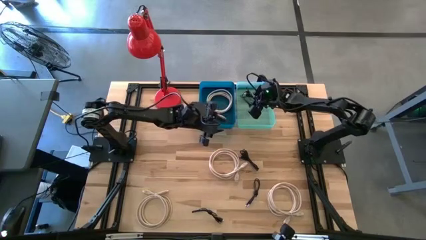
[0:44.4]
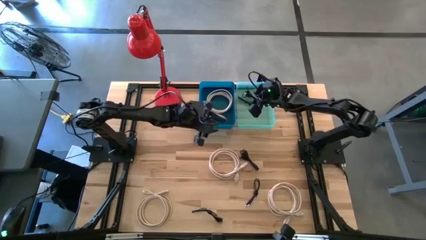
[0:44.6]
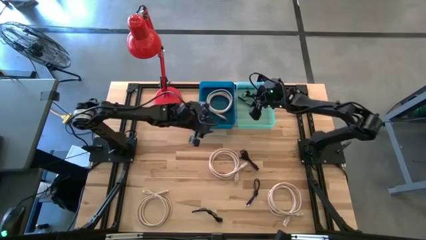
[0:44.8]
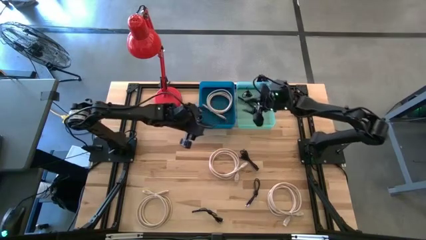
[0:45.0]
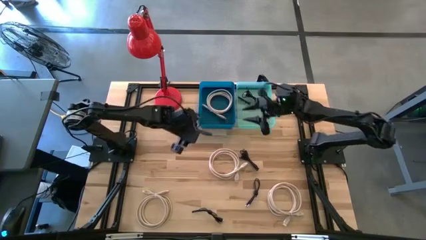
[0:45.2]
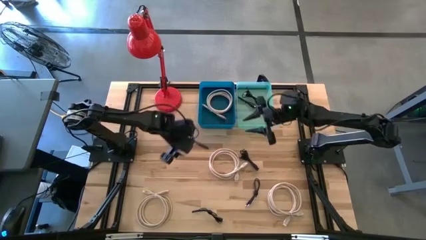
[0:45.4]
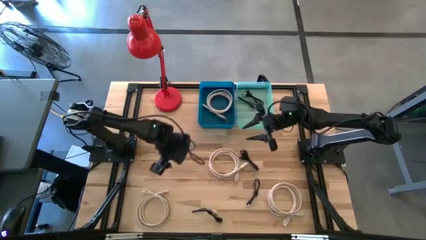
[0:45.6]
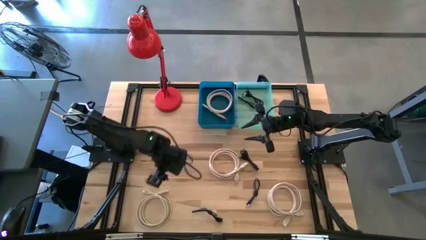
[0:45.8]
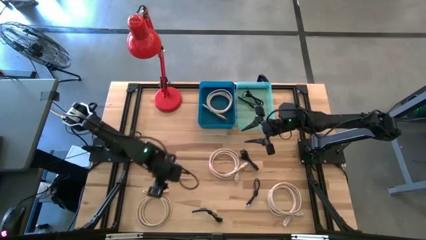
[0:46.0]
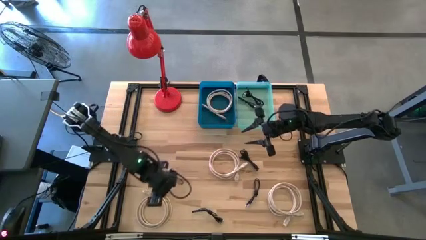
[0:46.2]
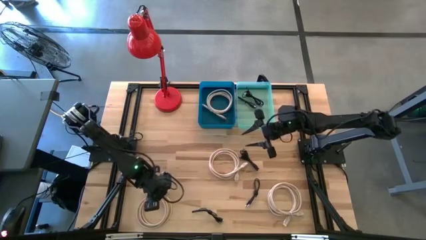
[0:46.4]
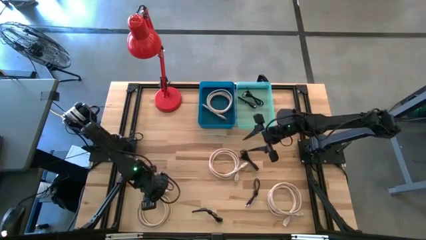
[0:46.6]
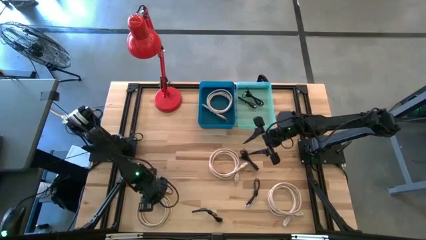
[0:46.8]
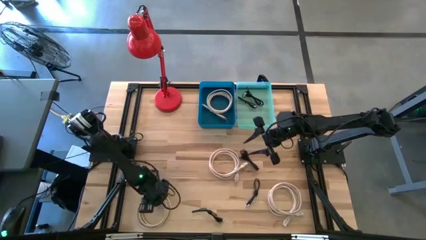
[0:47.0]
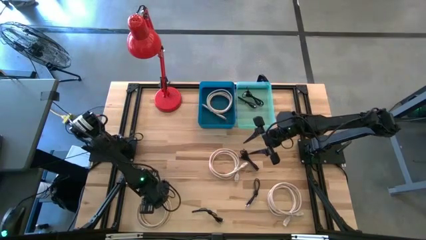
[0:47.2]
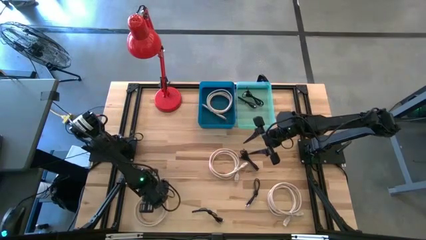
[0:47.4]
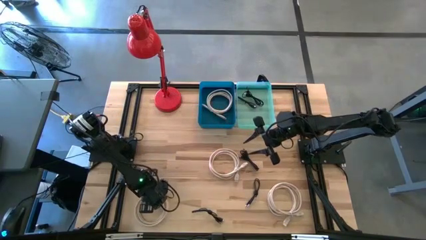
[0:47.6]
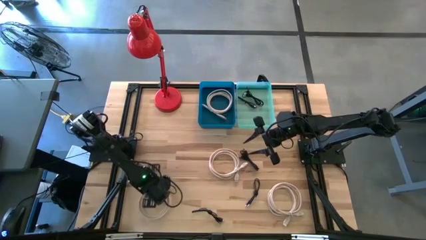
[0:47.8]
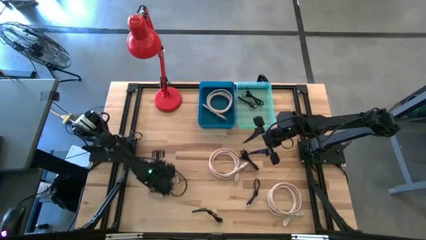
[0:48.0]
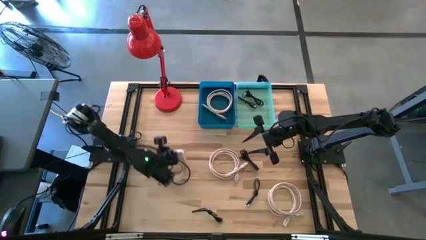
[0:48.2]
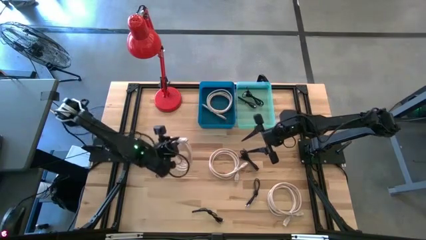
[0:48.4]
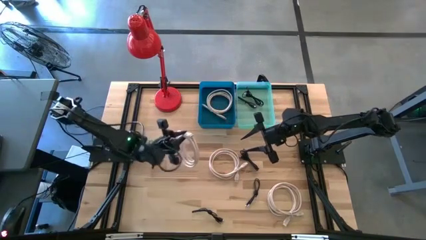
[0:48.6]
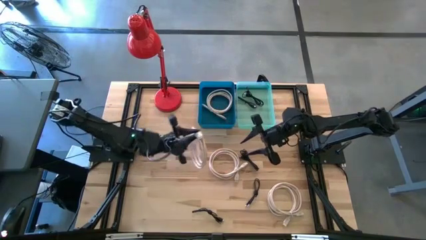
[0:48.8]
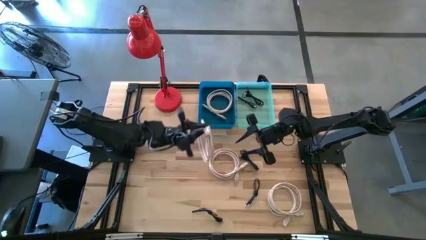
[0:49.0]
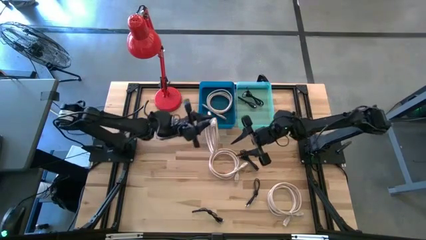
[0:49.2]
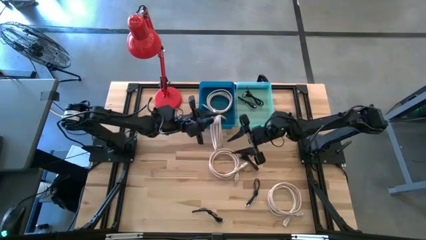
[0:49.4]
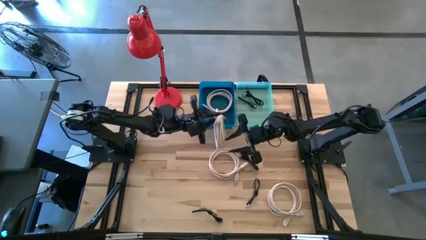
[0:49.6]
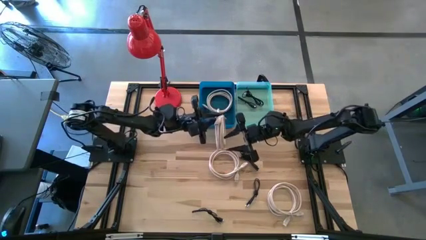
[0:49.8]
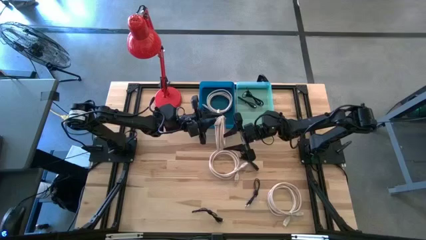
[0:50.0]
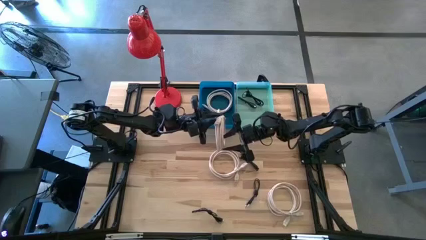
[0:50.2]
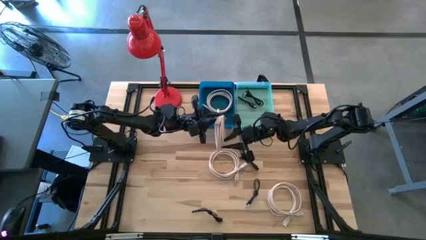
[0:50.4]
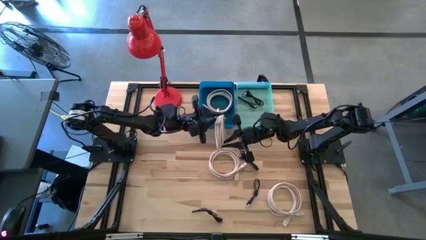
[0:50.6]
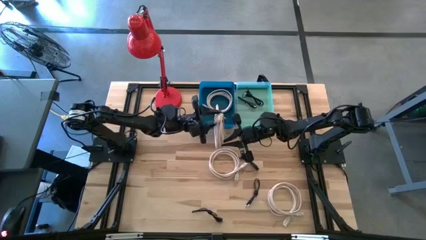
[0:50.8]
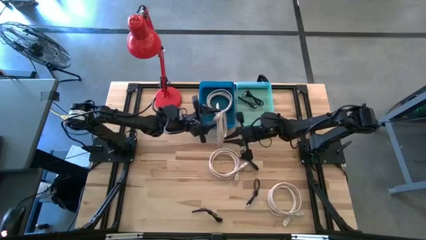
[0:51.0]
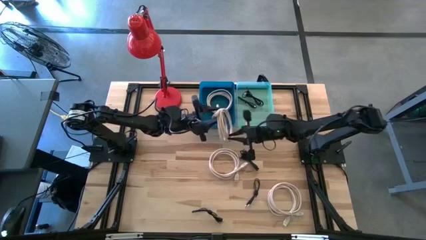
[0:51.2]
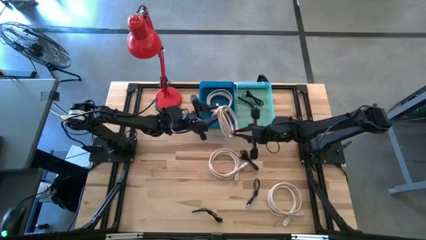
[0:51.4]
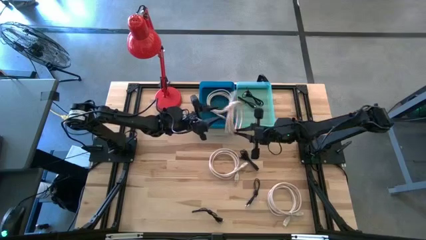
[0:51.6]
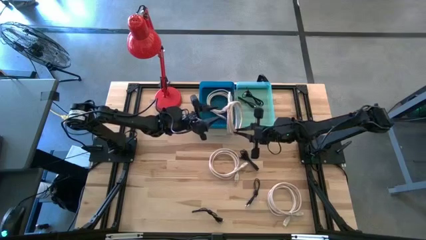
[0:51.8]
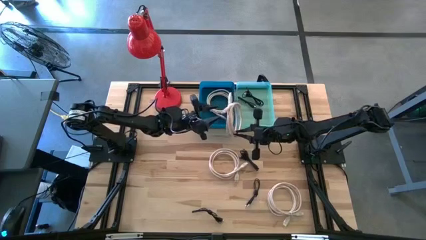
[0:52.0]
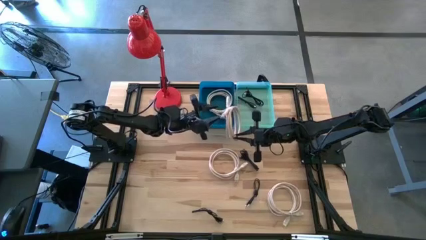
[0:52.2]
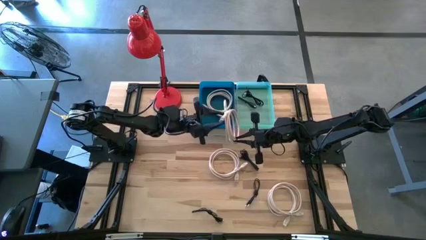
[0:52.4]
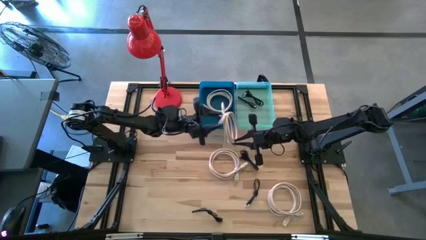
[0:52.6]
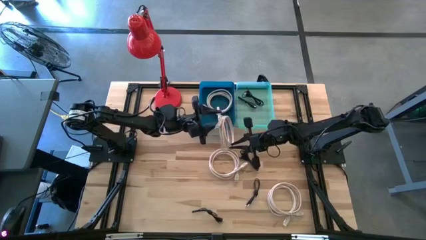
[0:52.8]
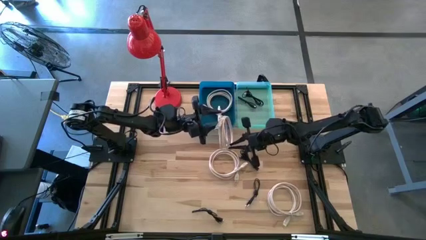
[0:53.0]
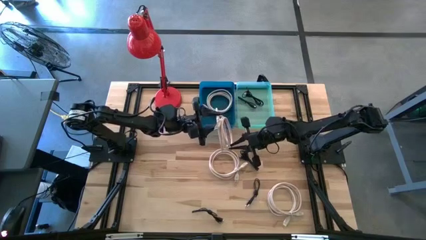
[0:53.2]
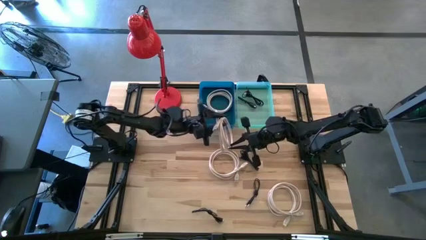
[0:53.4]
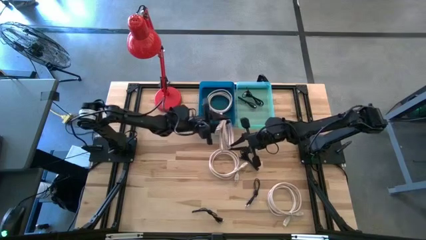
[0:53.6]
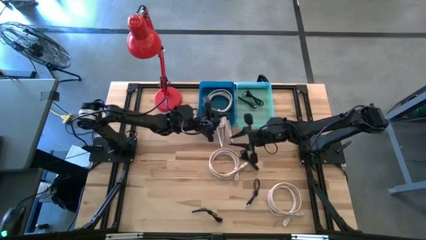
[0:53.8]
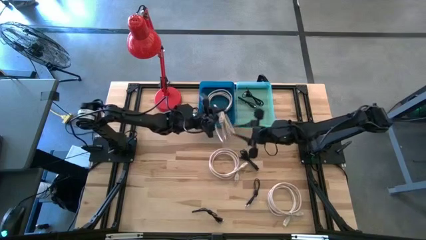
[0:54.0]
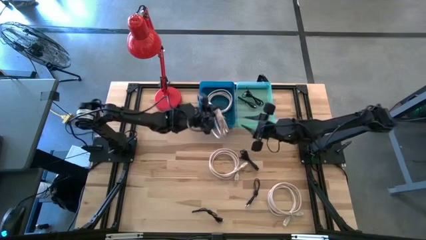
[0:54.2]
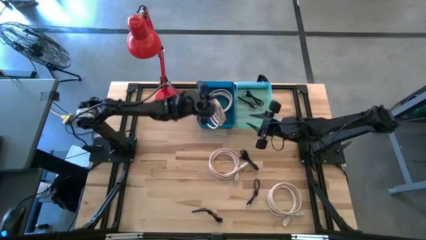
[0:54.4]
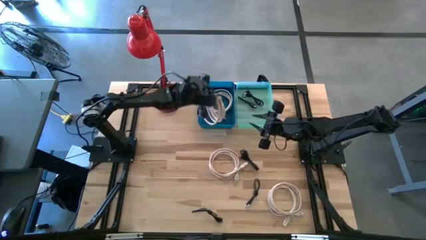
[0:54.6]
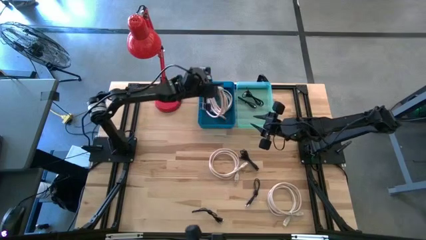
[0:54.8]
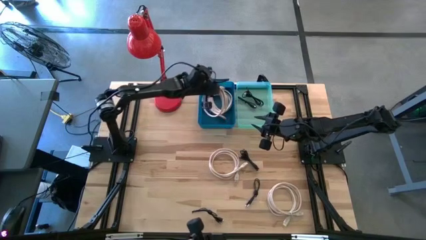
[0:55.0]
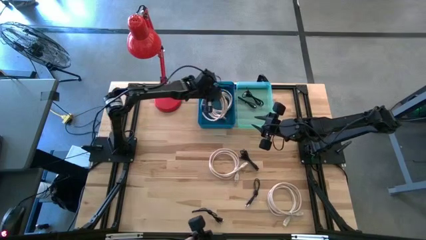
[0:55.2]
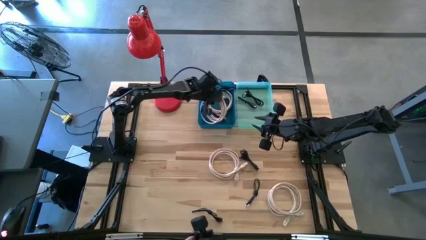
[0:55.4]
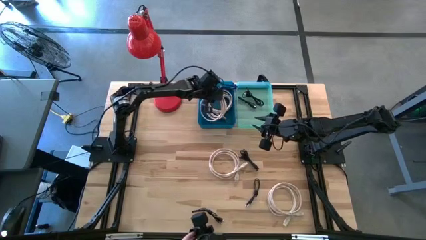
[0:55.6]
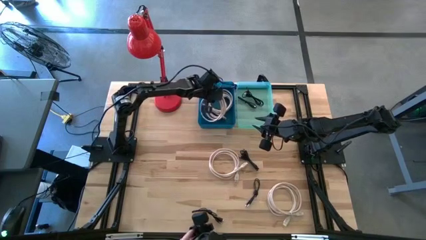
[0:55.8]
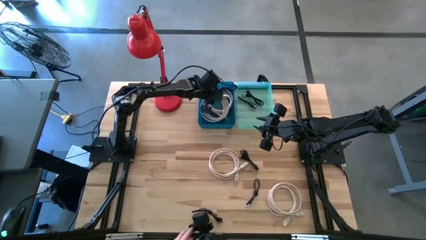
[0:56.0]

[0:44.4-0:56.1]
Task: Pick & Place USB Port
Put the white charger cable into the blue bin

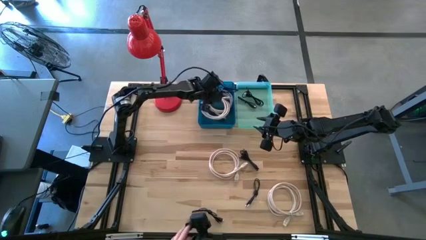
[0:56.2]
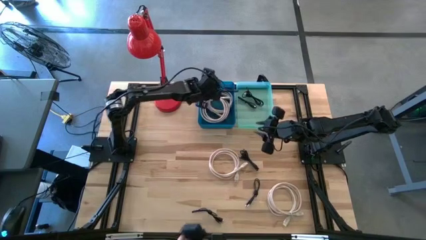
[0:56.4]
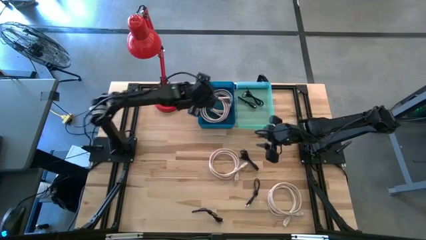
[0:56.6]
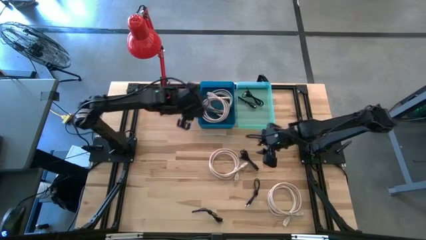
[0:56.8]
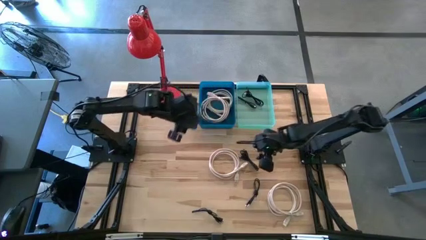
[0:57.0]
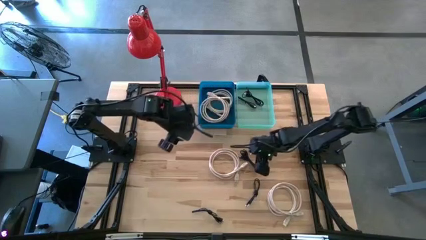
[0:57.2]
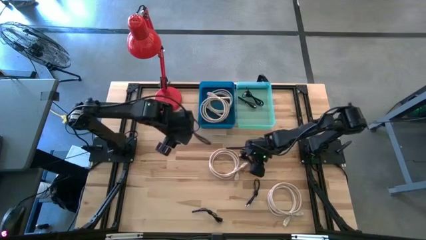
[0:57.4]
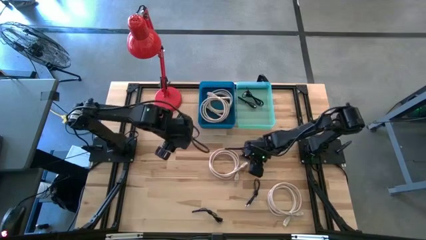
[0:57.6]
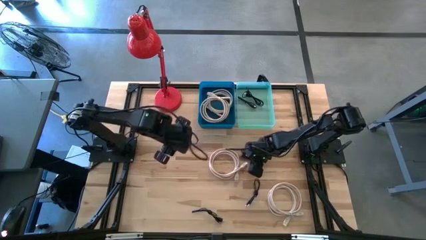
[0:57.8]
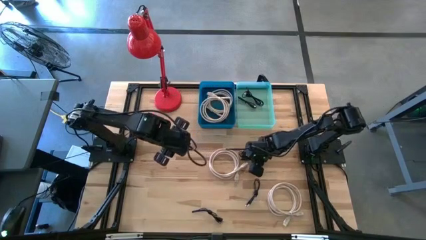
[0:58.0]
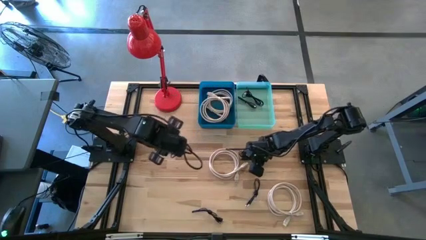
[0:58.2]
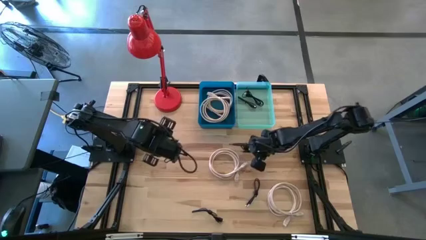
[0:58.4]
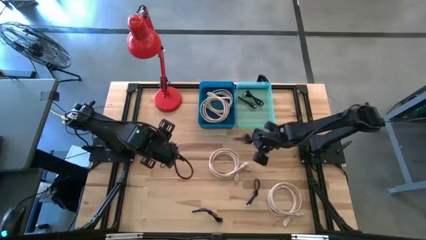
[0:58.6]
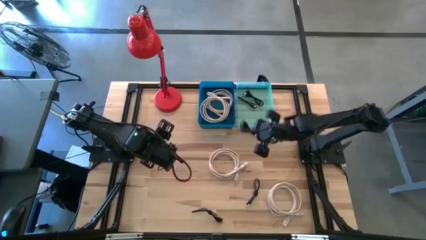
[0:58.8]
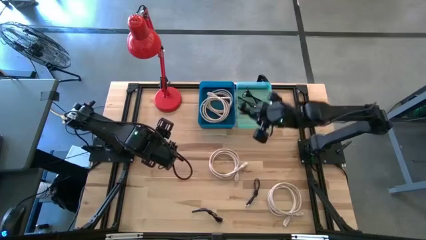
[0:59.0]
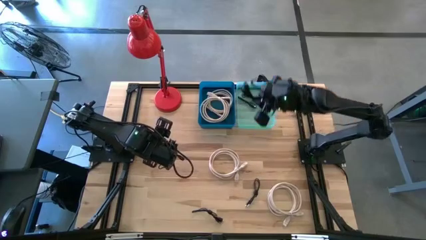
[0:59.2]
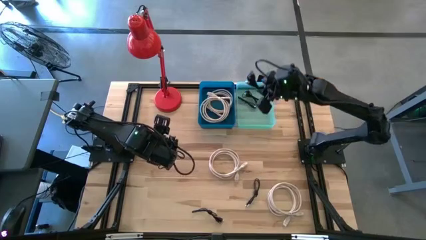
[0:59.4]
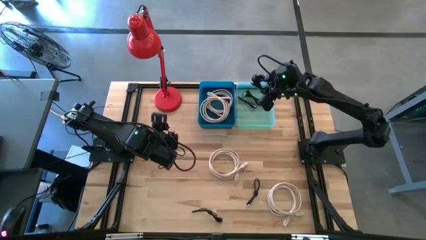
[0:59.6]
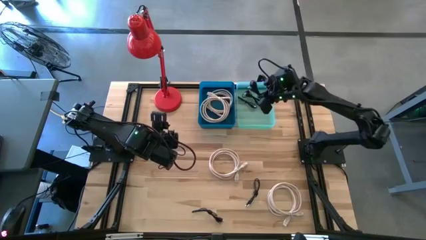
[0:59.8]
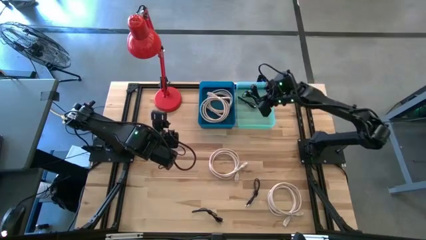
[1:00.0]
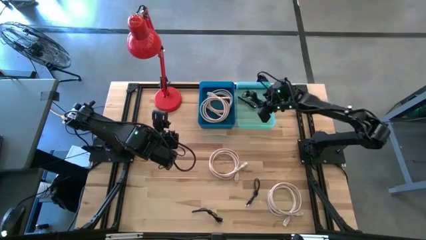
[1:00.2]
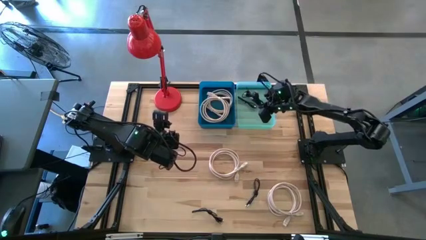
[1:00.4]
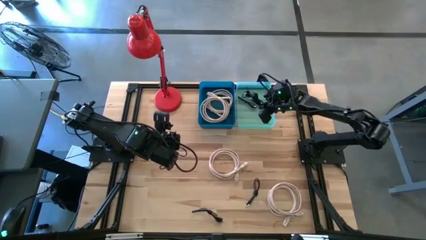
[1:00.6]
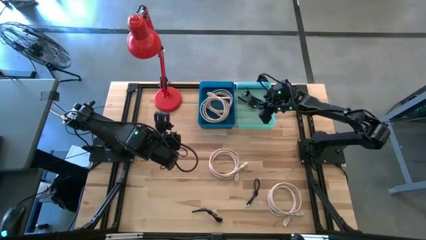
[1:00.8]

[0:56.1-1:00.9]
Put the black charger cable into the green bin
